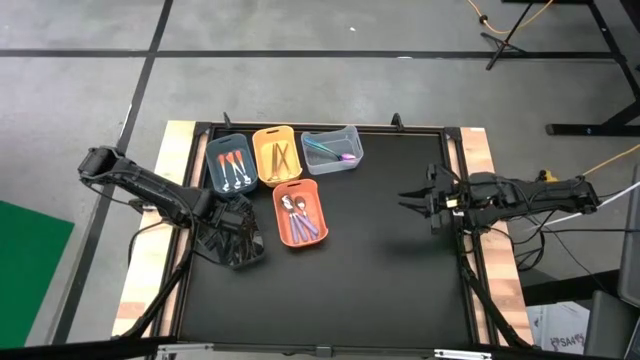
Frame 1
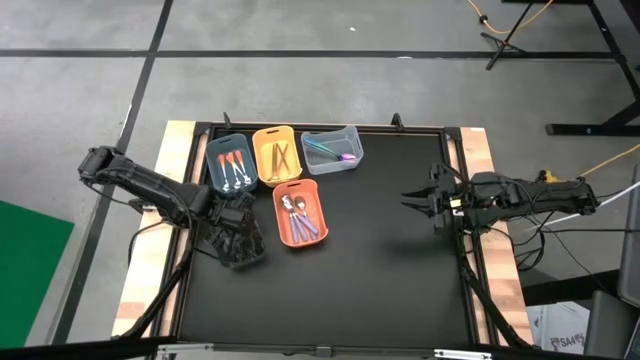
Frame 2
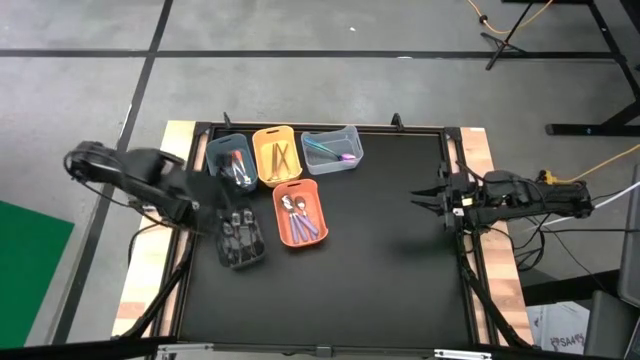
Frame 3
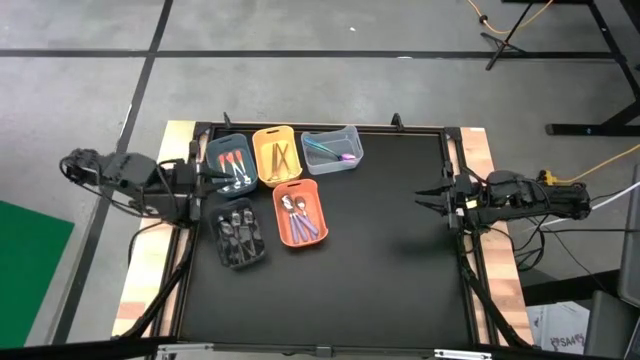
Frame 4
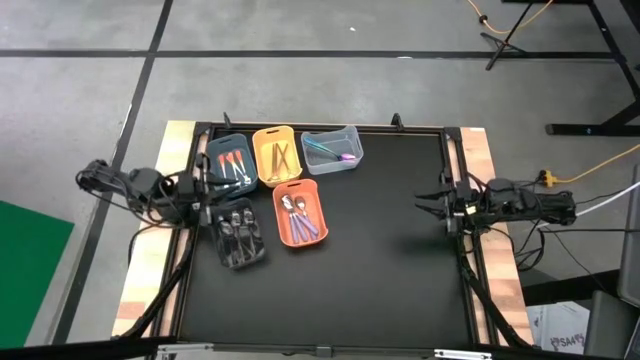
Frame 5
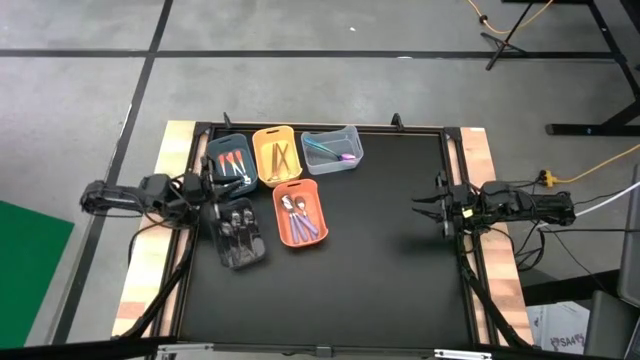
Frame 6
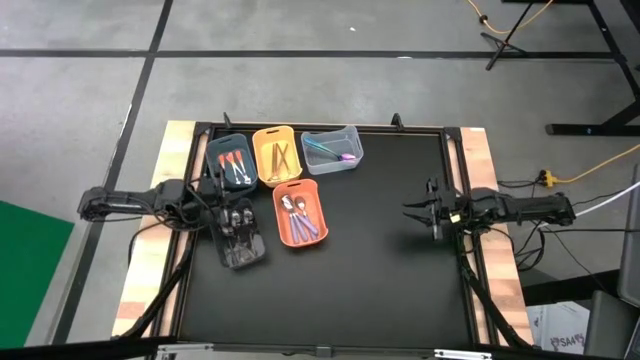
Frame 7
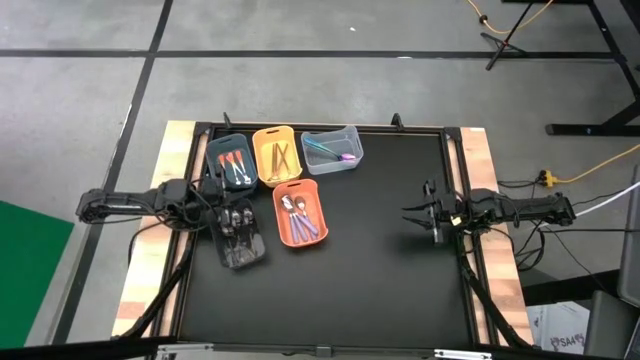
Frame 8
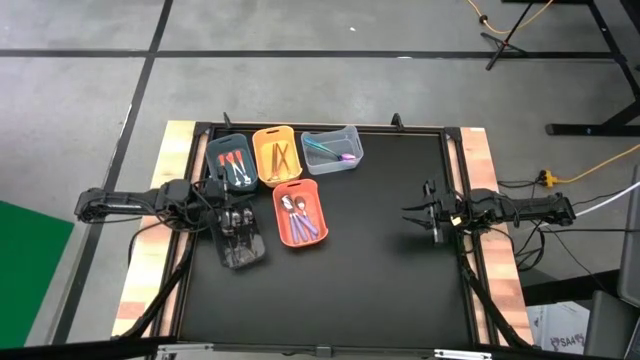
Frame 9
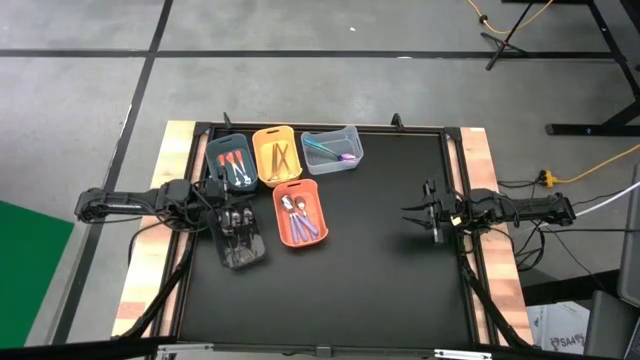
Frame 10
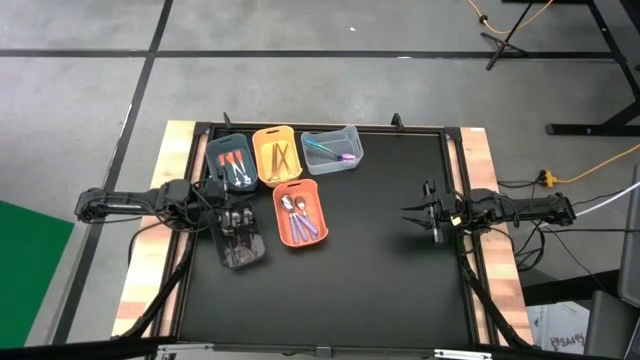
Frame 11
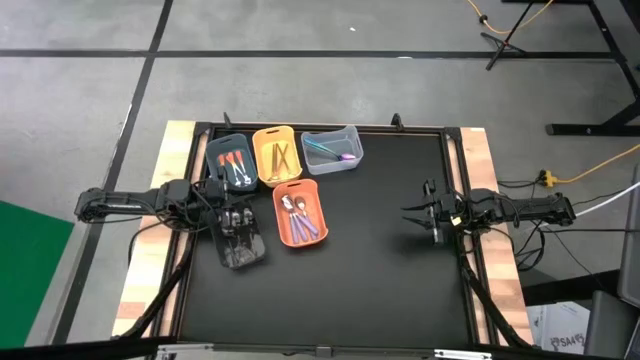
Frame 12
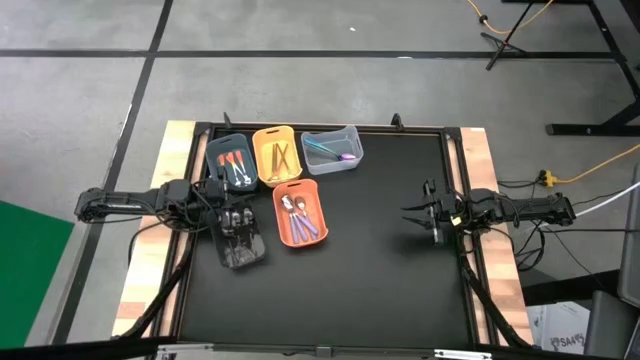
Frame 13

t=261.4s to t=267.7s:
Task: Sort silverware by color (type)
Return to Home Position
